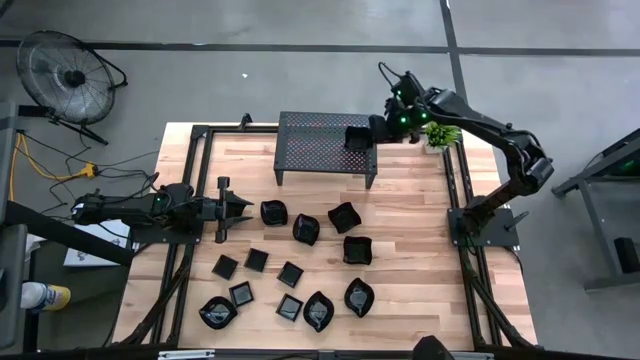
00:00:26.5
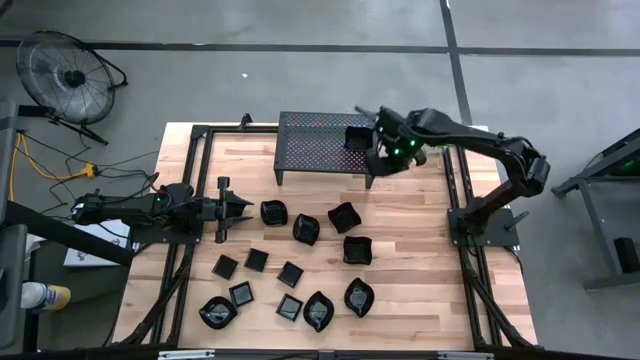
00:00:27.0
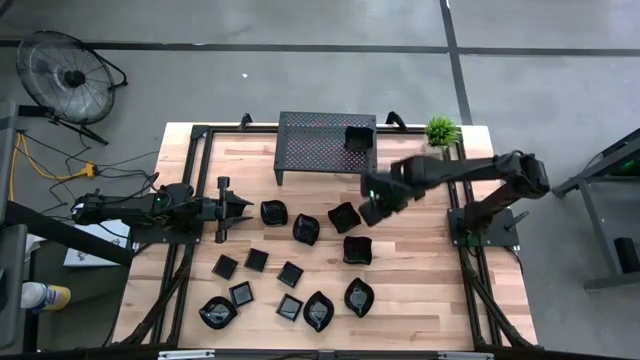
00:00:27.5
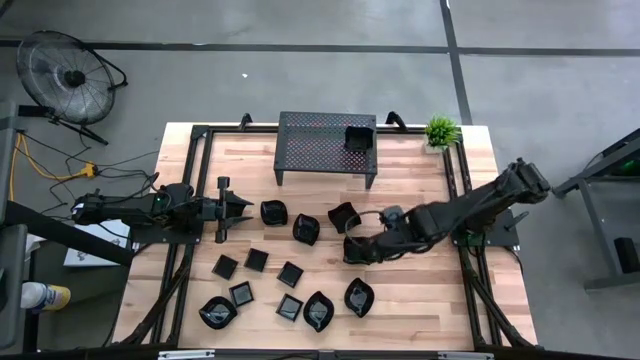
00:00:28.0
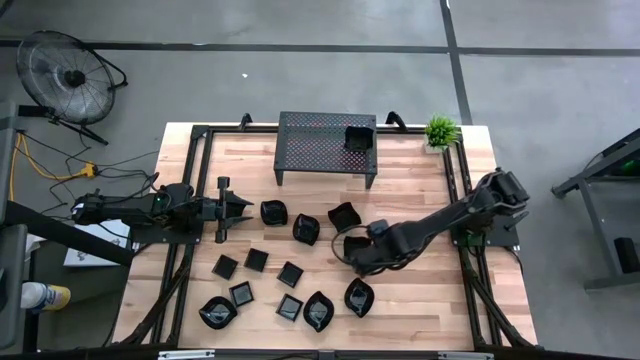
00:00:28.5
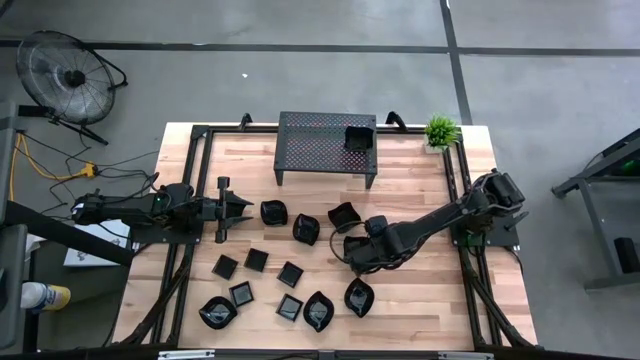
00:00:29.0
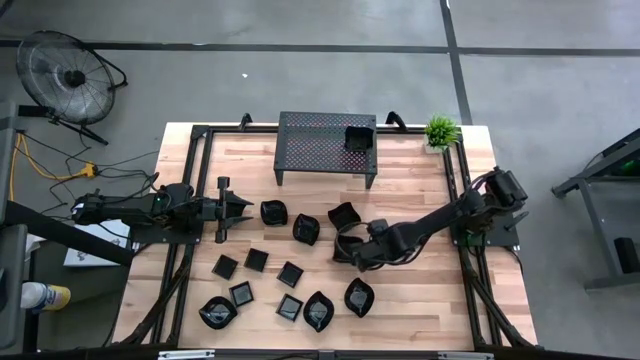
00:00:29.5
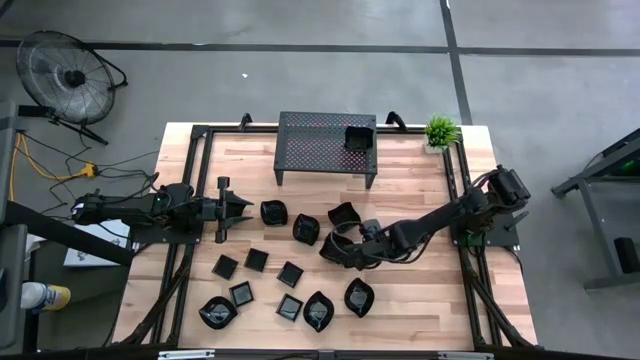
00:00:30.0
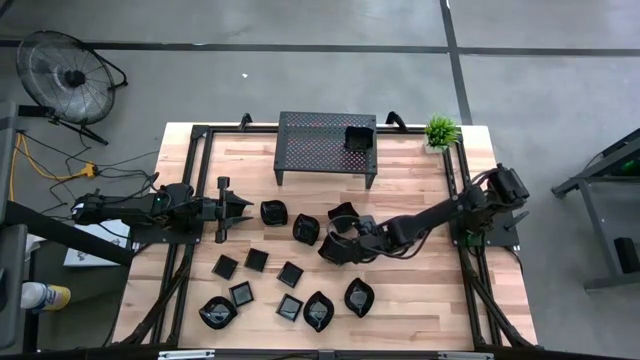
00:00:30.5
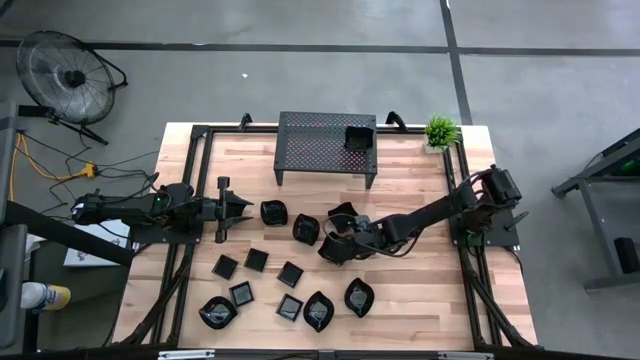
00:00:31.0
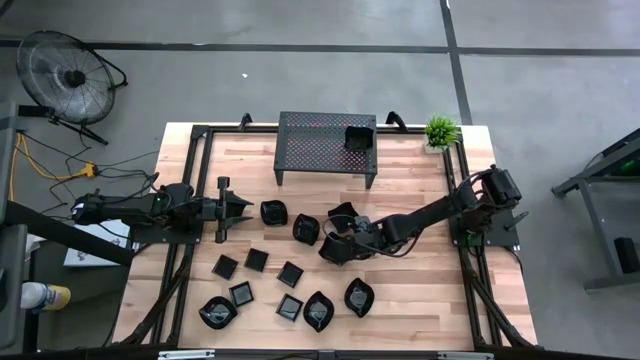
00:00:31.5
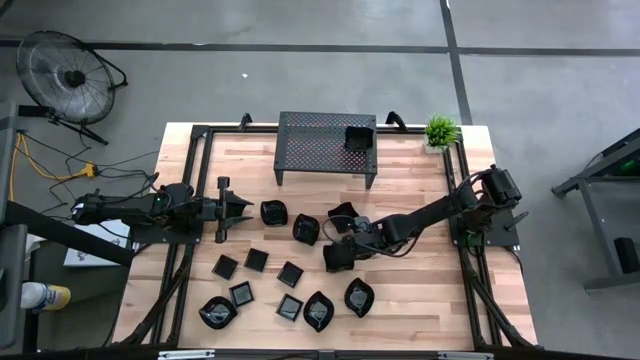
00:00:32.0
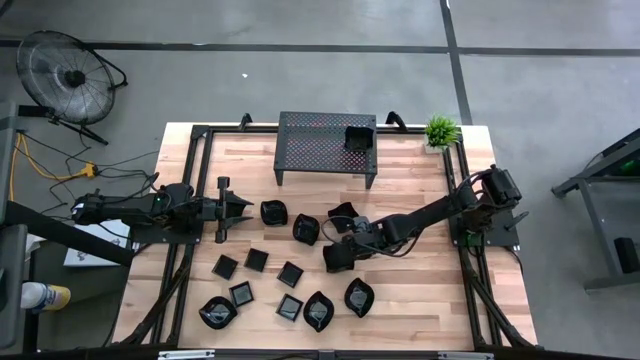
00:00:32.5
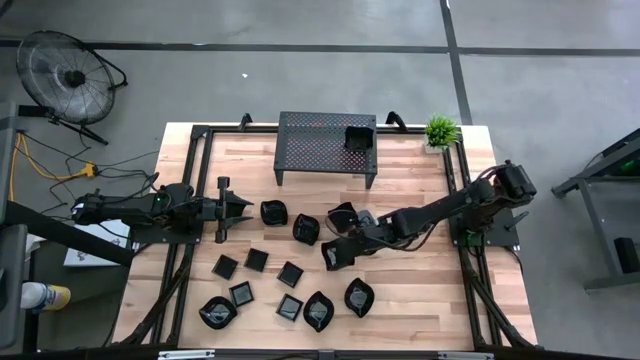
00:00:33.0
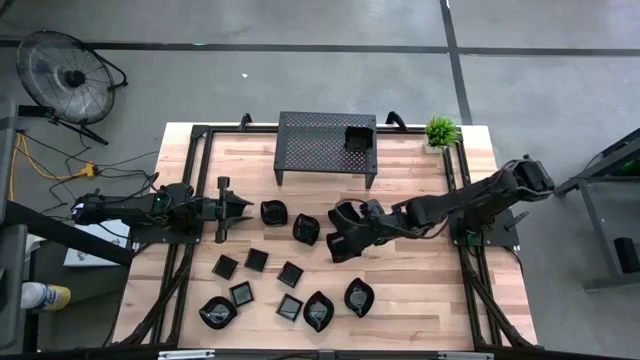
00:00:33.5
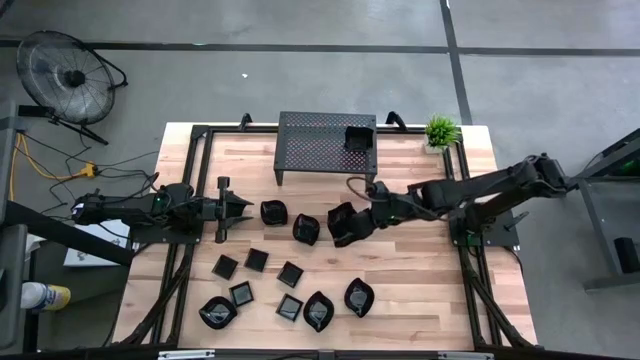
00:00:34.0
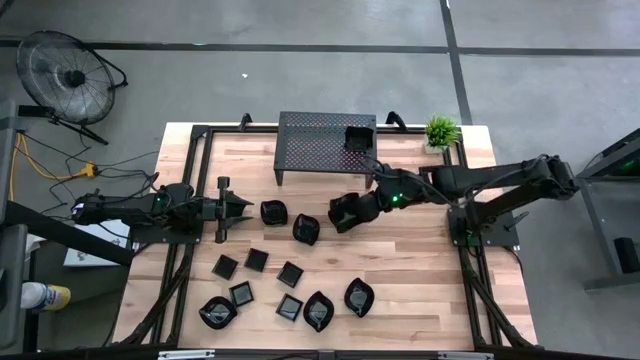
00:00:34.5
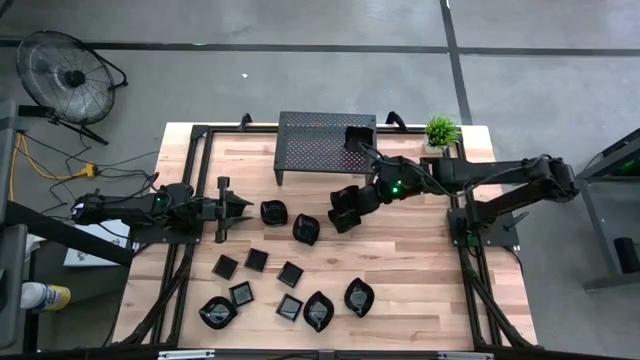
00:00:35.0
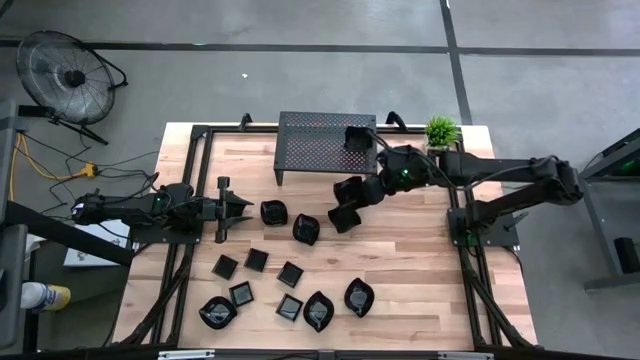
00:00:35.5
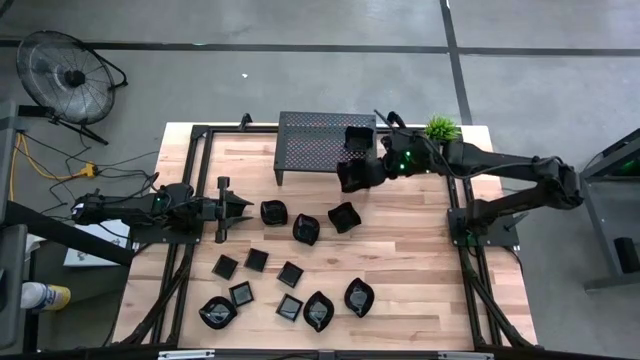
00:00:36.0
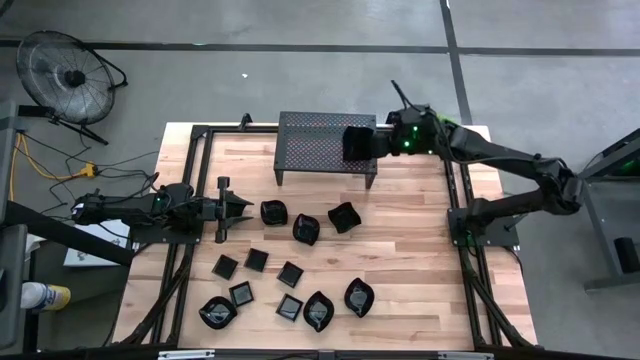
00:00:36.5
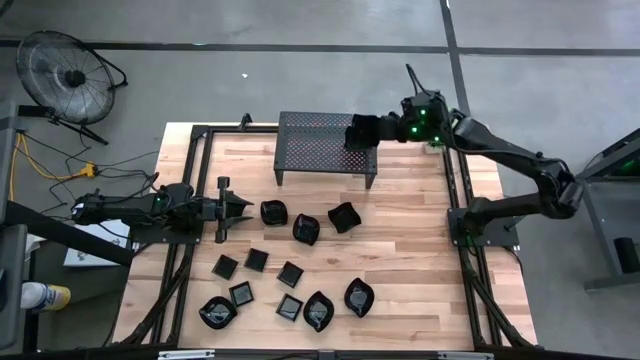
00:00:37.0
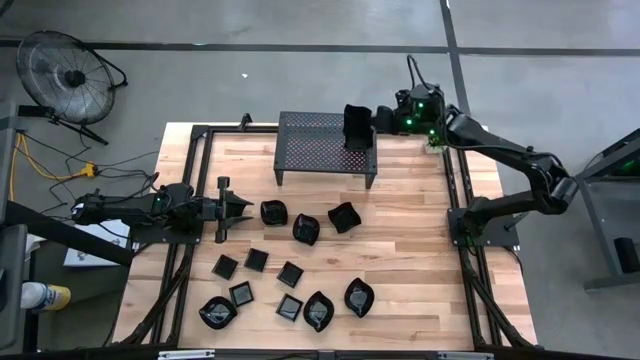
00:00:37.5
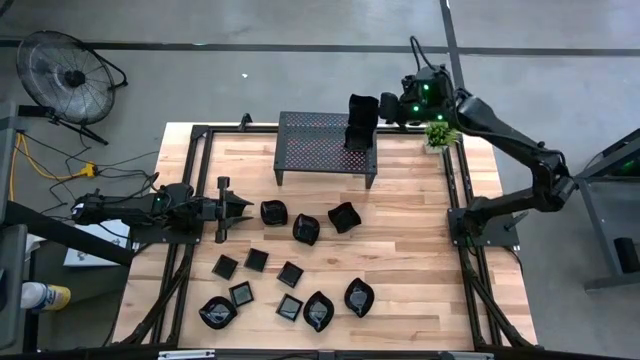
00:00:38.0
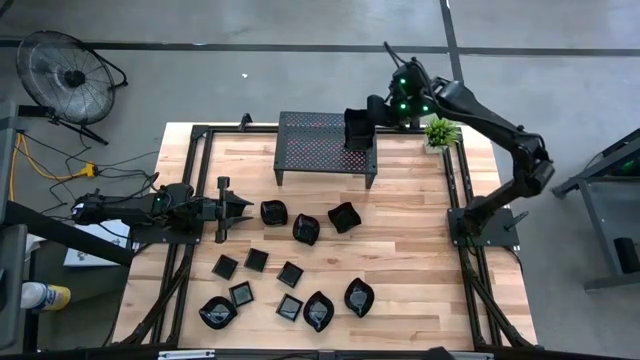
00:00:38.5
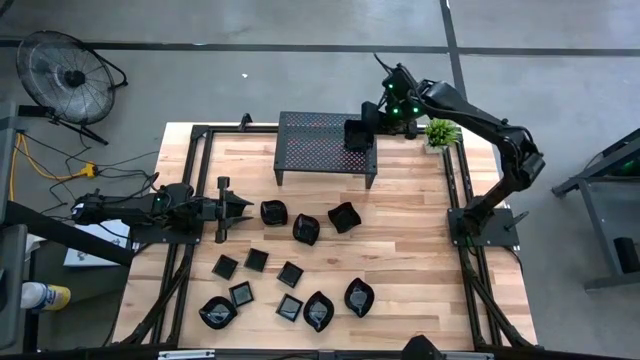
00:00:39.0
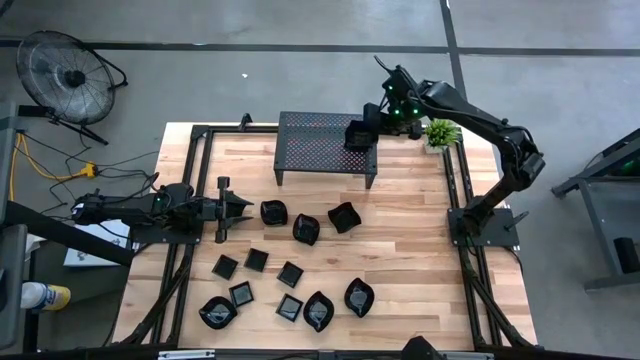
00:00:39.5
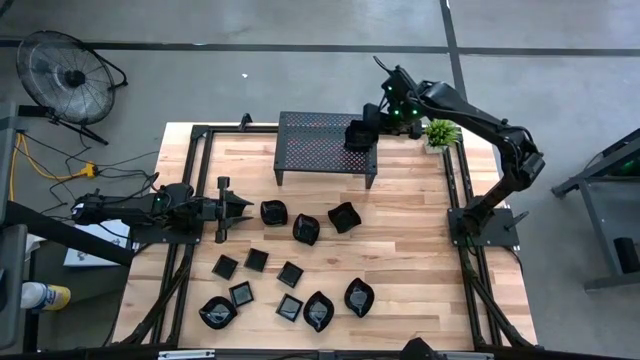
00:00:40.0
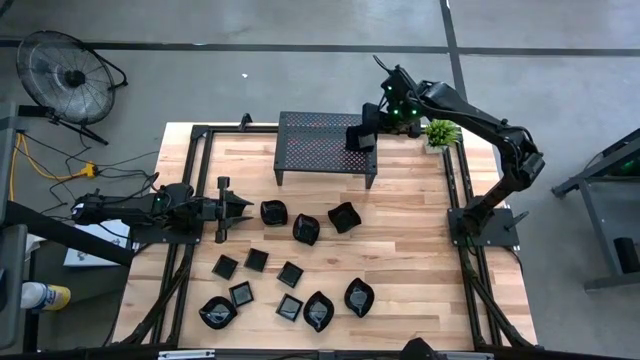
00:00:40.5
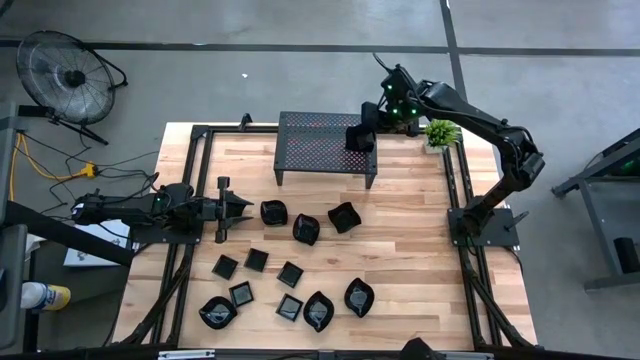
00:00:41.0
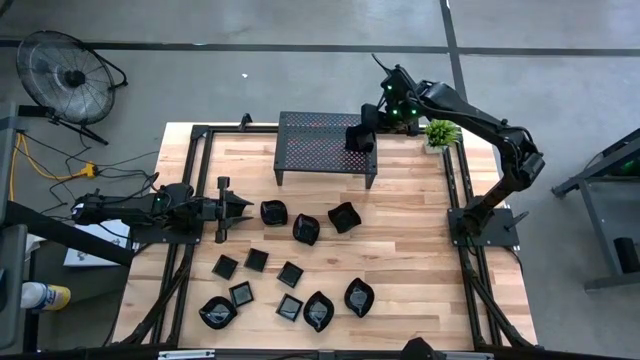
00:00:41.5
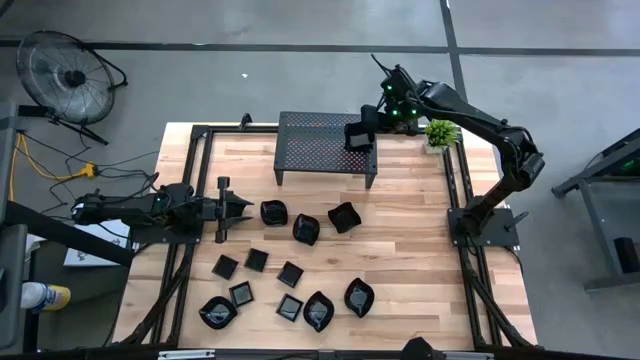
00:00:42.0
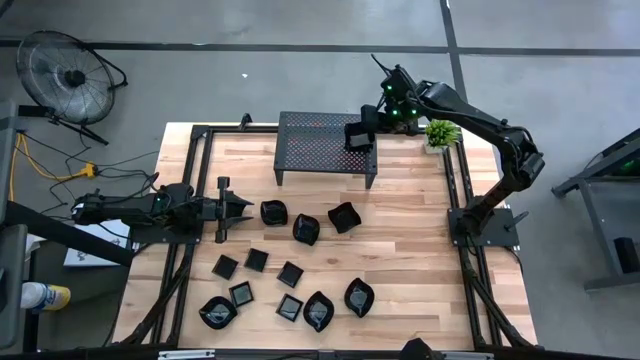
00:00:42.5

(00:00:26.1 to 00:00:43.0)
Task: Pick & Place Mini shaped plates
Stack the bottom black distorted square plate on top of the black distorted square plates on the shelf

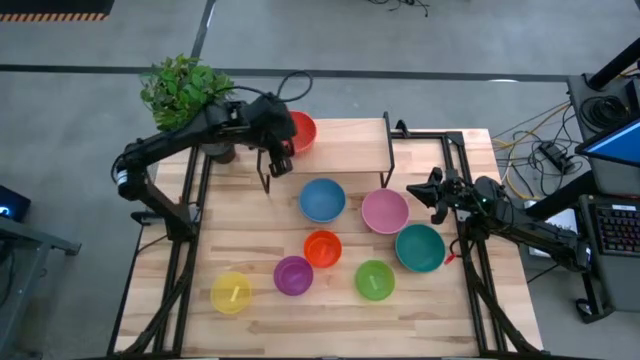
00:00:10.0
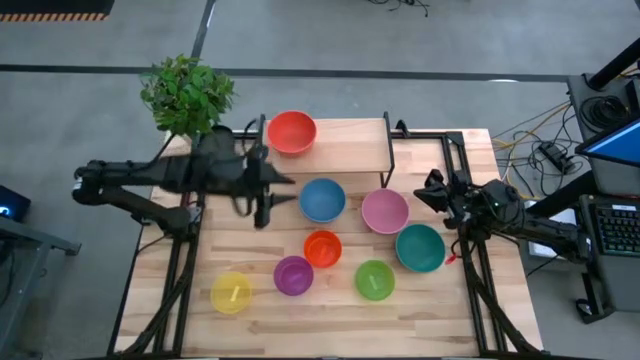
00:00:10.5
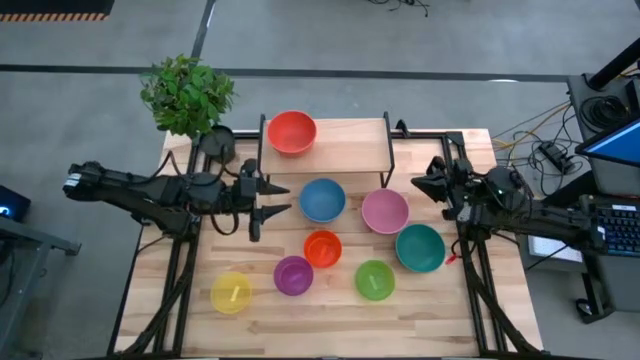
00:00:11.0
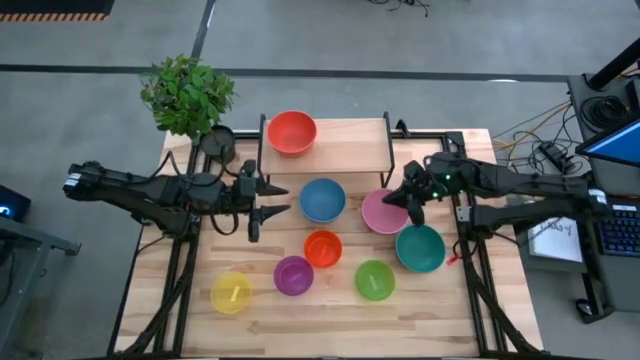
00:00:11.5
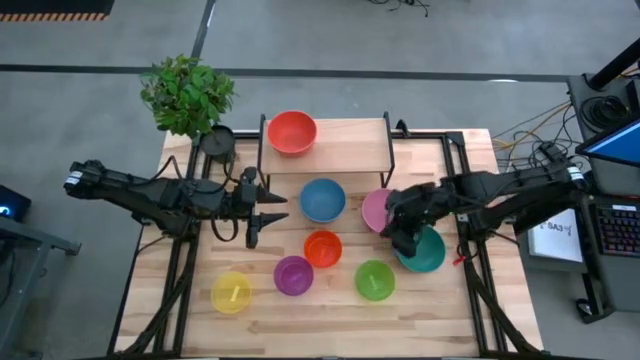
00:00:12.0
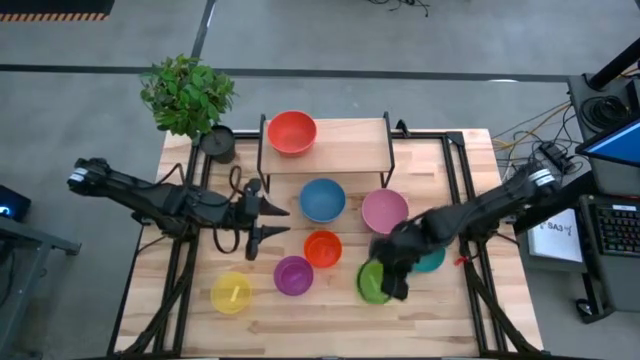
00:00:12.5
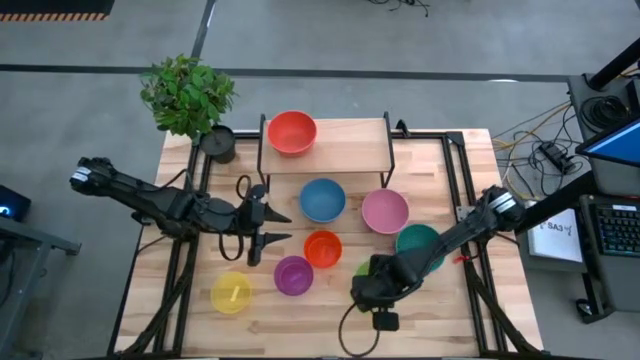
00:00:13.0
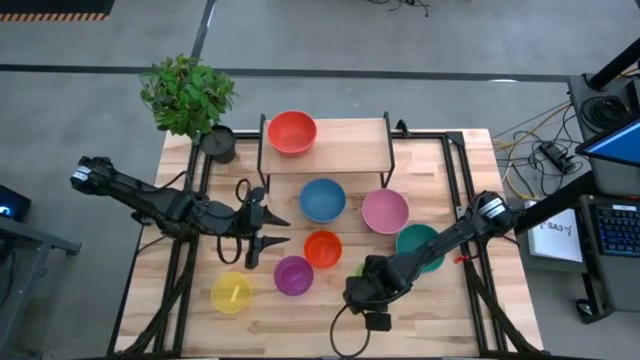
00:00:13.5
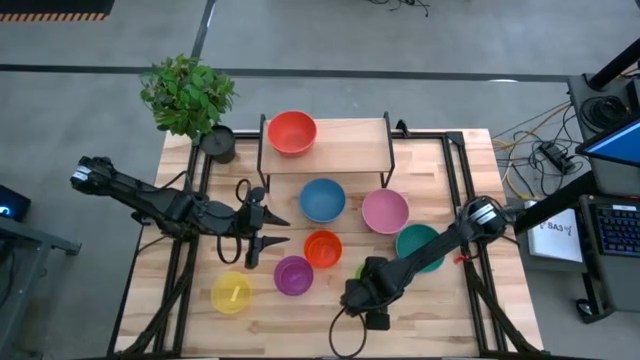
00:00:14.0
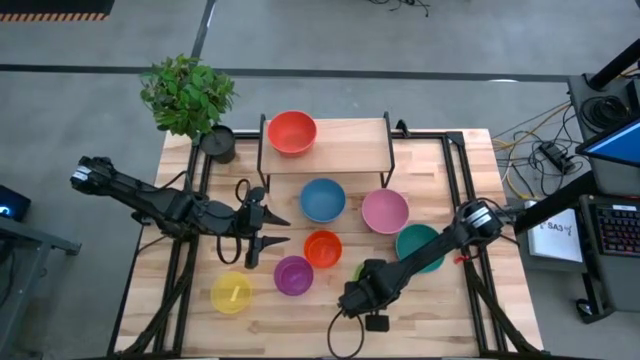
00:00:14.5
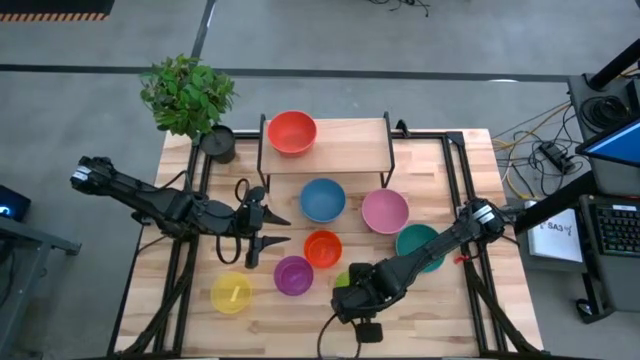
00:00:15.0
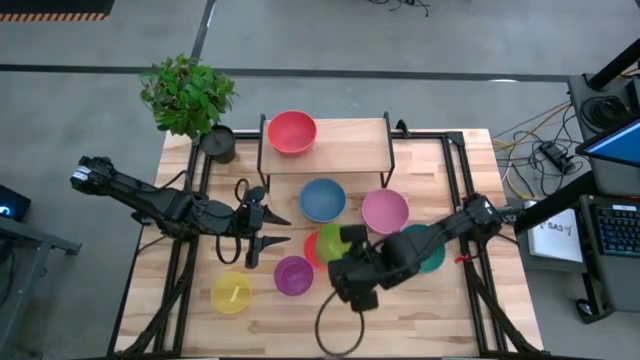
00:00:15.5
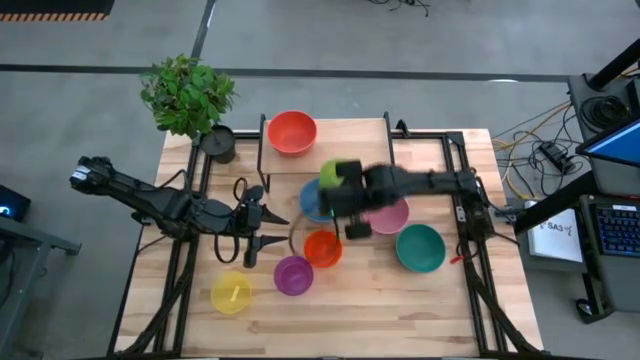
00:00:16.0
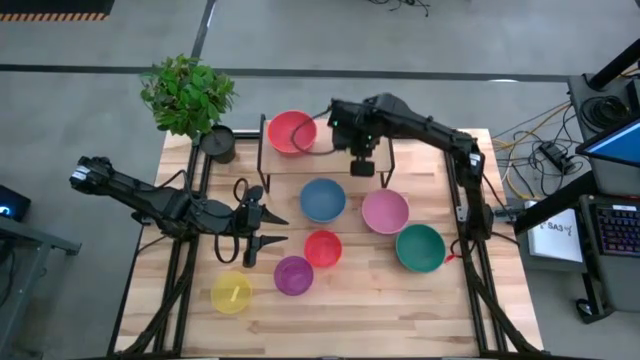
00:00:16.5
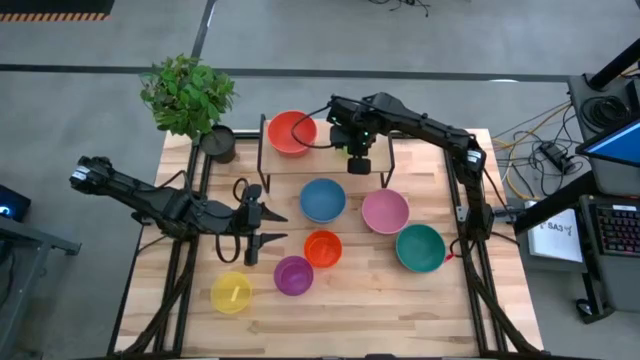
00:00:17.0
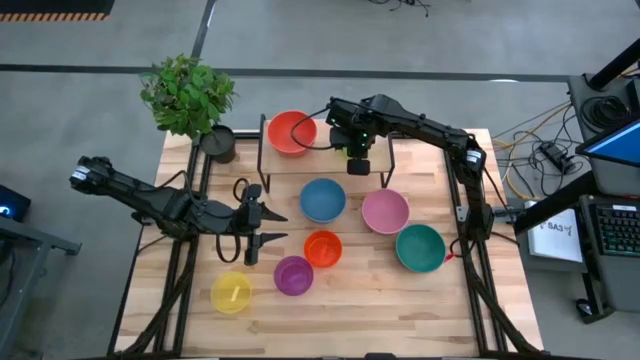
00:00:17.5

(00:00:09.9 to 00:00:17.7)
Task: Place and stack bowls onto a shelf
Put the small light green bowl on the shelf
